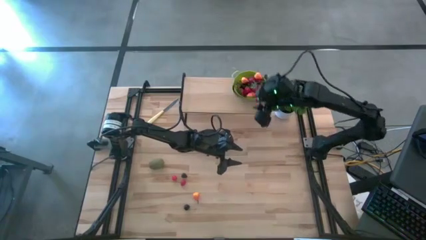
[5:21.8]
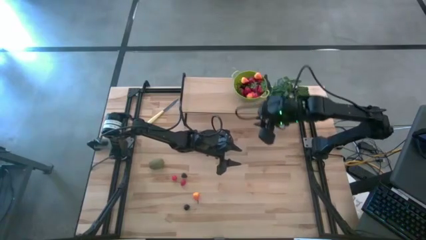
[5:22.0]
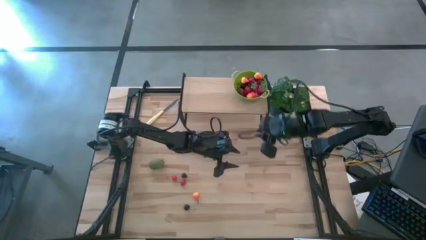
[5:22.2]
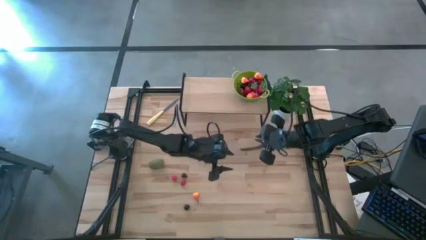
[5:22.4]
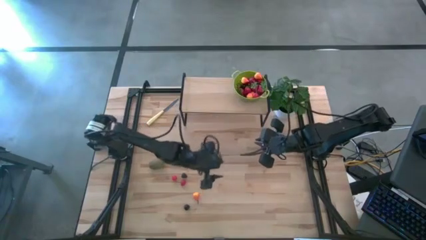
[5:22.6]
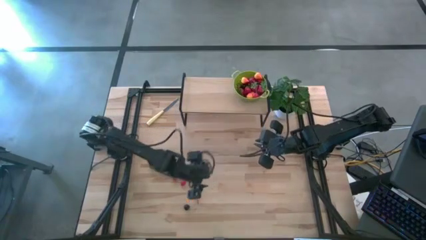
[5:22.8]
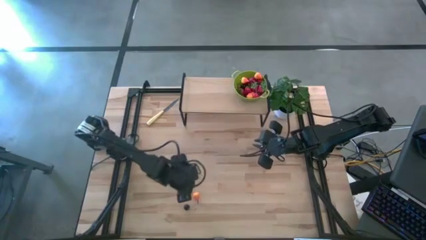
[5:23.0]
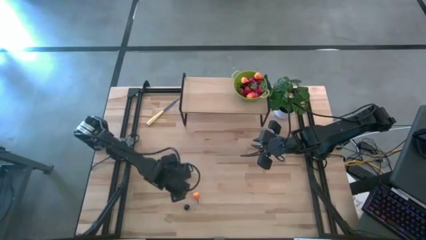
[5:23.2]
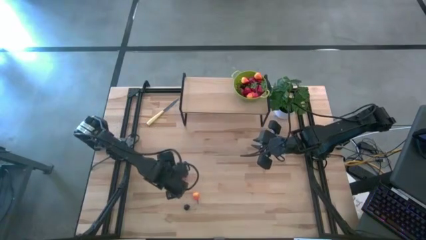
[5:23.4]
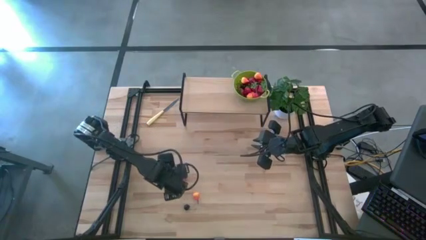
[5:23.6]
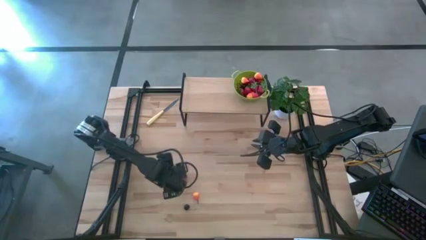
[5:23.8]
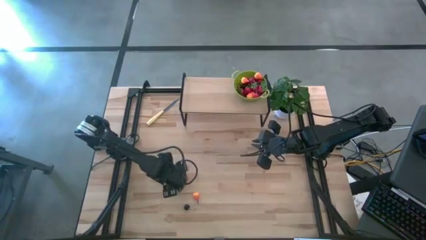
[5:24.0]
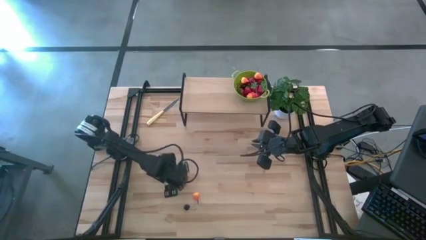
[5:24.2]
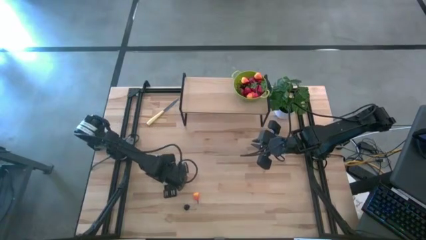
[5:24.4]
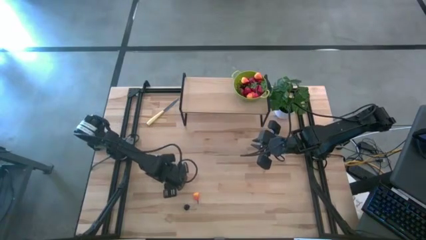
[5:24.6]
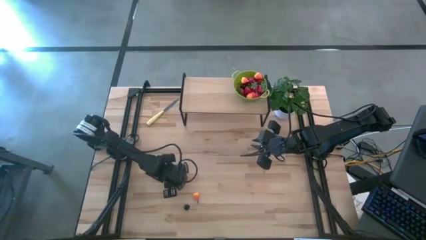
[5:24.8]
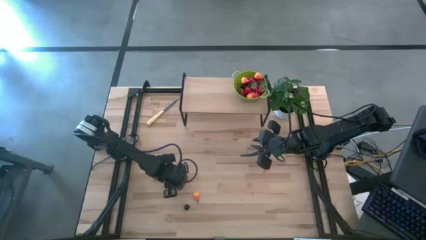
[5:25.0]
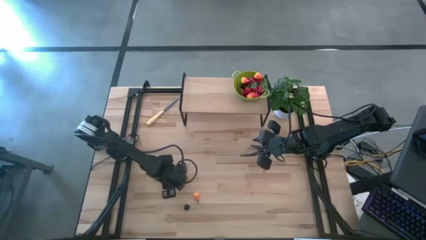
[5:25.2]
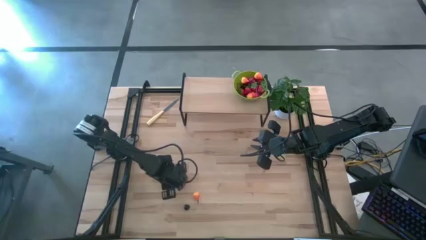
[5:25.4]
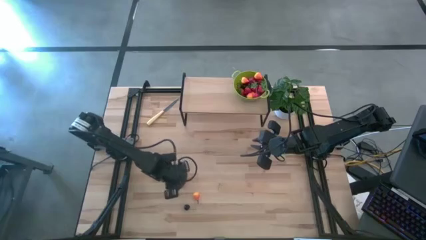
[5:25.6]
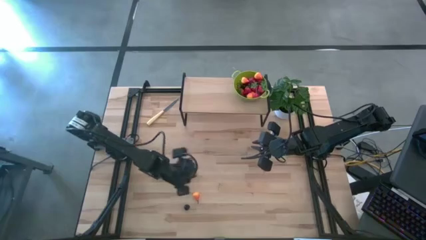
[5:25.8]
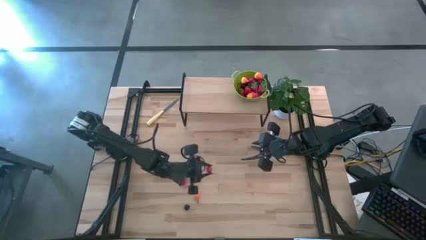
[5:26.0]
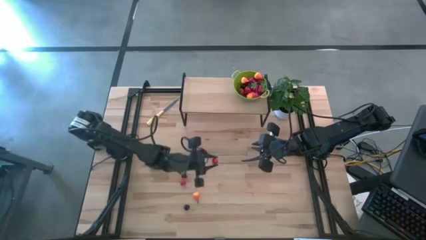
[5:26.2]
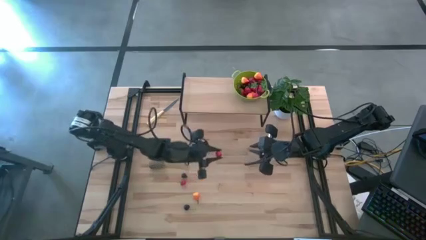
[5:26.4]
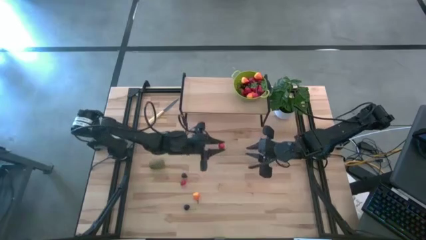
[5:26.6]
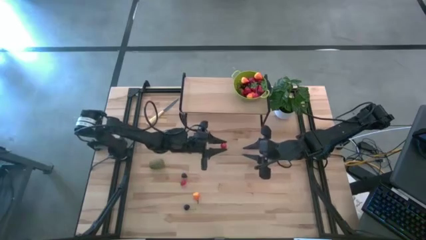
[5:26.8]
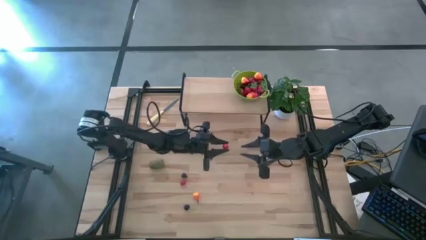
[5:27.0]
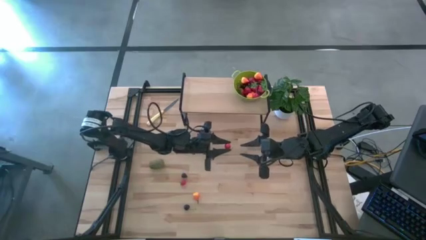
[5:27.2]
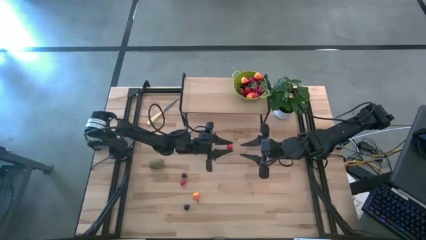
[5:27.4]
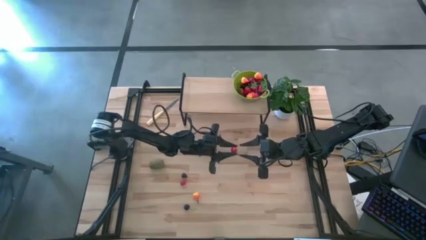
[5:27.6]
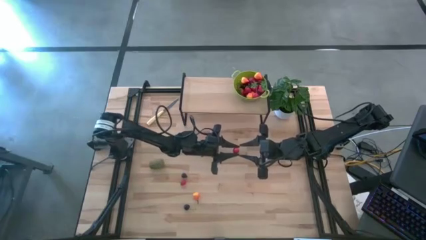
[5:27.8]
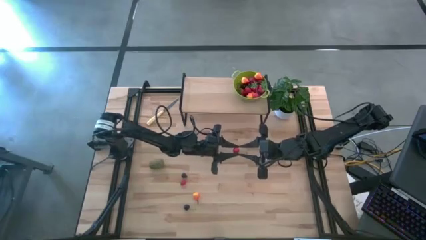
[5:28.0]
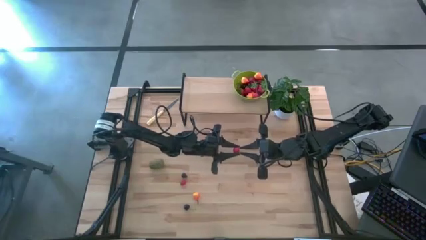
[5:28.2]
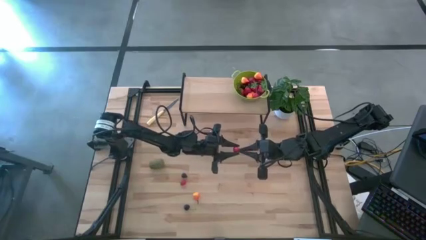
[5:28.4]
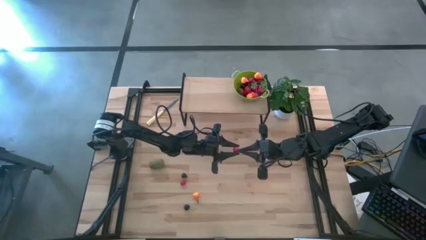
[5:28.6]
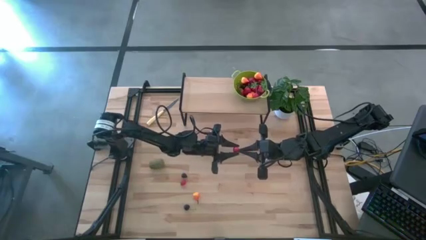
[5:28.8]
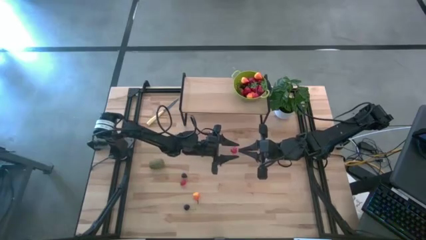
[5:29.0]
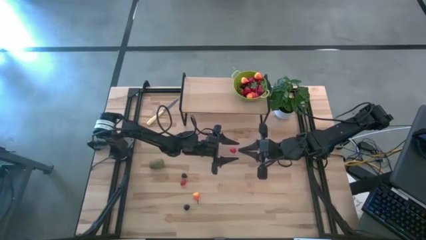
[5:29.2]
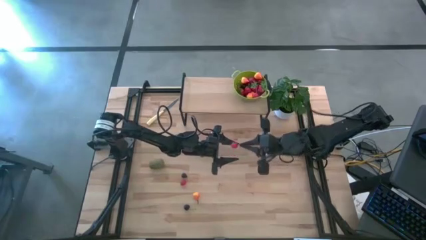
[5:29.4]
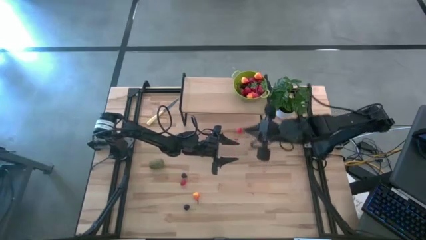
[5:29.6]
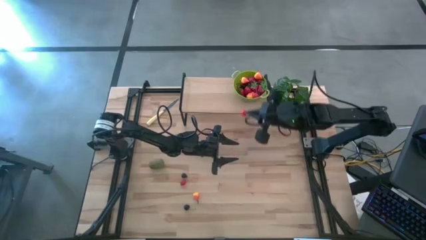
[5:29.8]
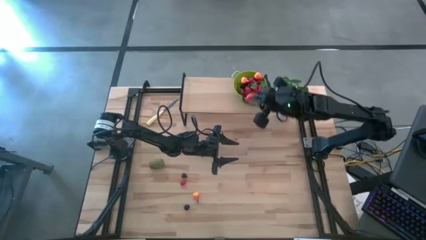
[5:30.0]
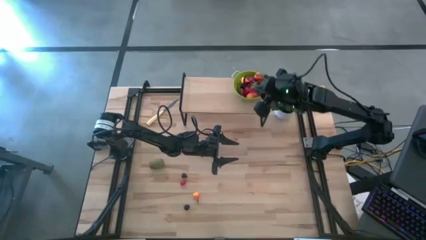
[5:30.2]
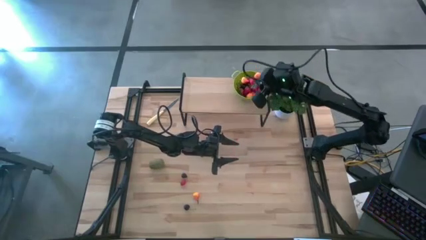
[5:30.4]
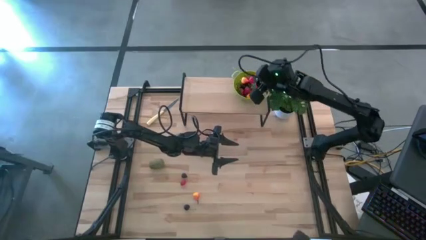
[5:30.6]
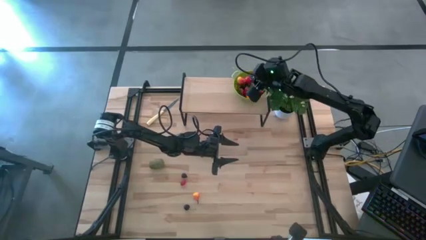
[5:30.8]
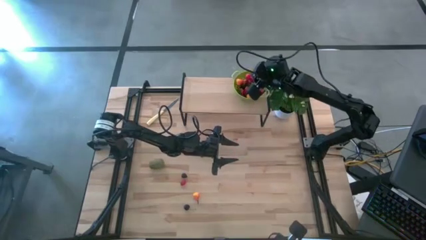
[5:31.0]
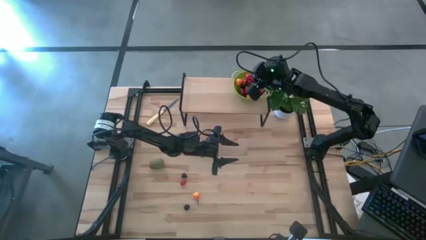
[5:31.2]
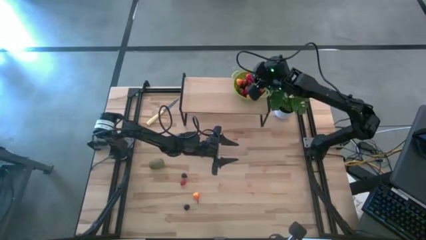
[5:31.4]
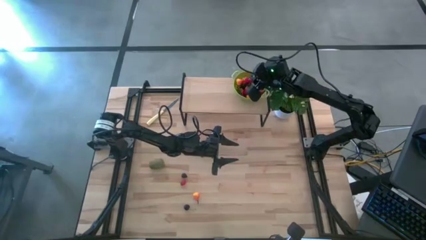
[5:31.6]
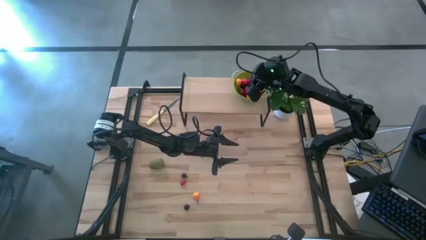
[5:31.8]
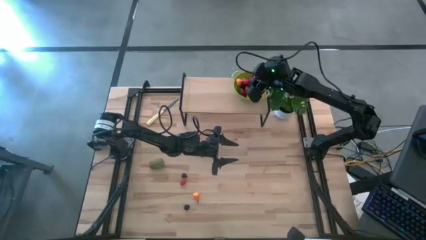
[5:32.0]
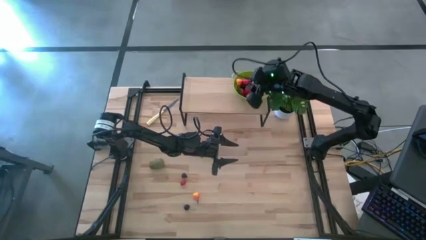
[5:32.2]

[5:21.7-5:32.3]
Task: Build produce basket
Put the red cherry into the green basket

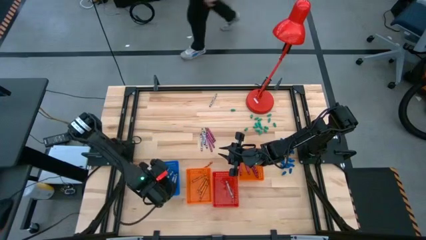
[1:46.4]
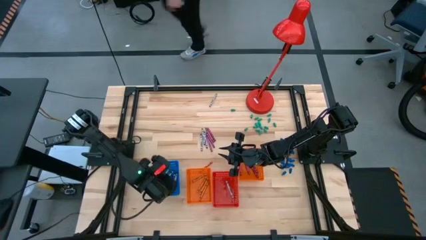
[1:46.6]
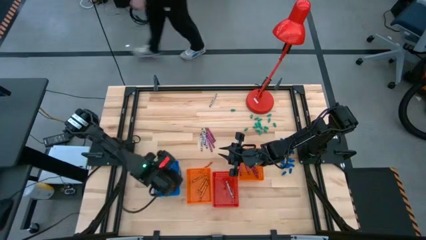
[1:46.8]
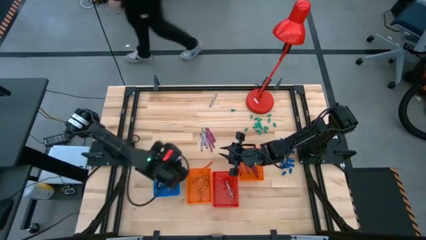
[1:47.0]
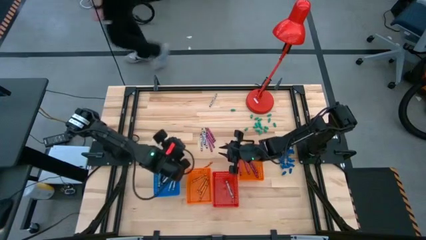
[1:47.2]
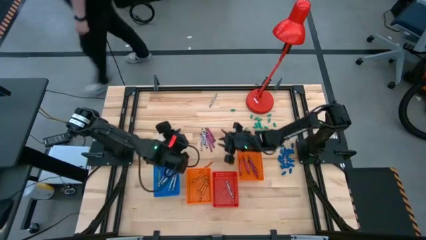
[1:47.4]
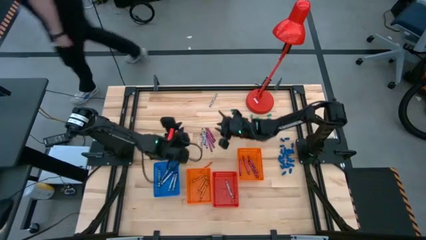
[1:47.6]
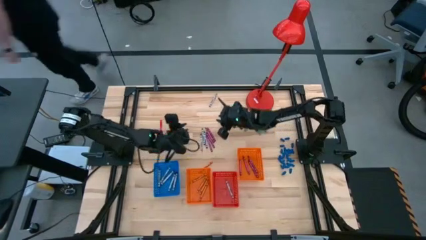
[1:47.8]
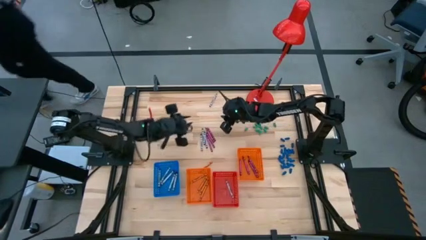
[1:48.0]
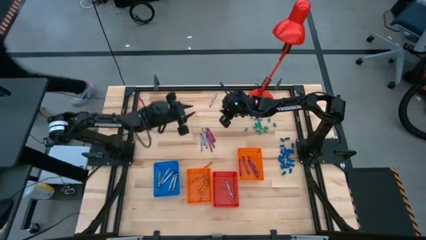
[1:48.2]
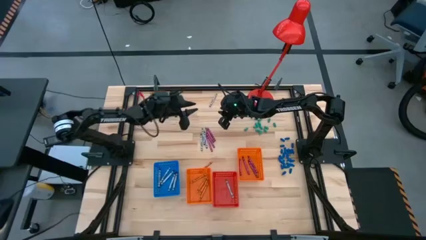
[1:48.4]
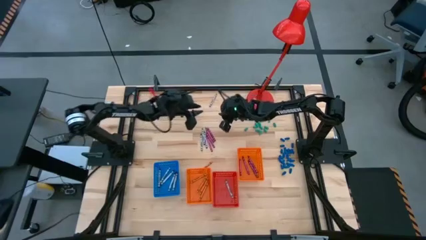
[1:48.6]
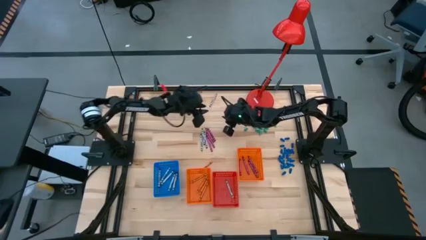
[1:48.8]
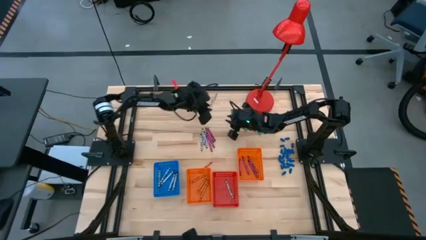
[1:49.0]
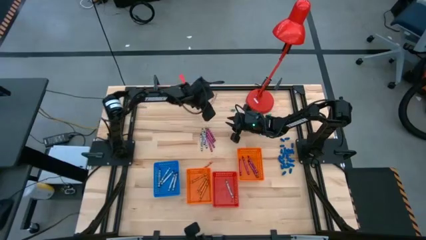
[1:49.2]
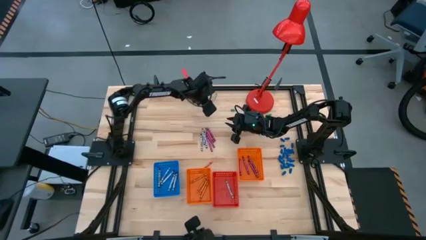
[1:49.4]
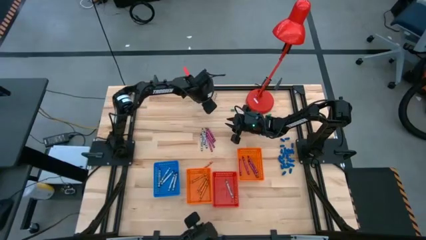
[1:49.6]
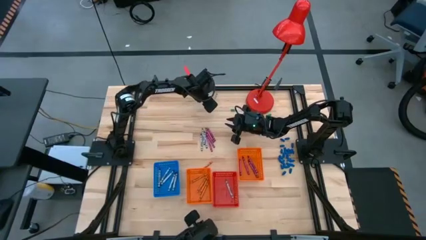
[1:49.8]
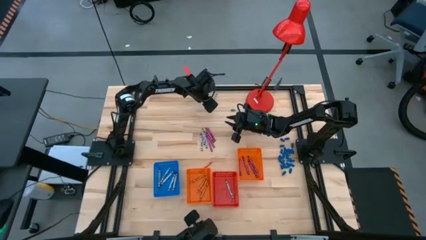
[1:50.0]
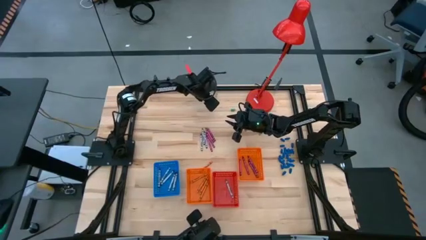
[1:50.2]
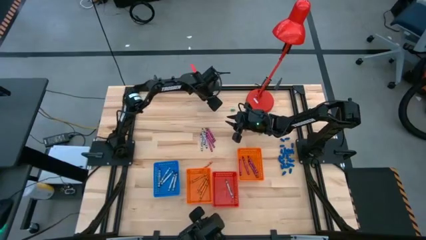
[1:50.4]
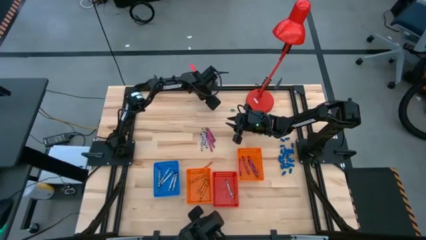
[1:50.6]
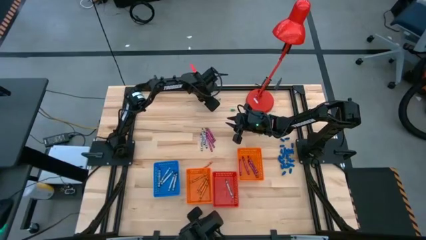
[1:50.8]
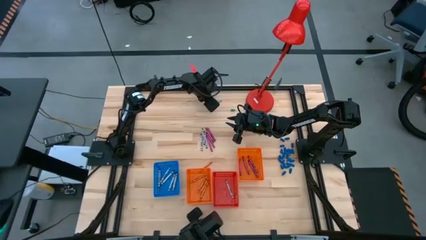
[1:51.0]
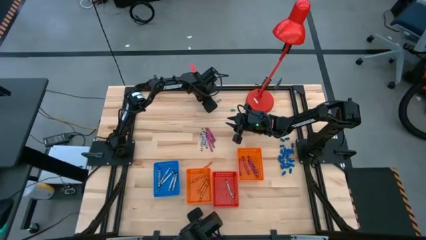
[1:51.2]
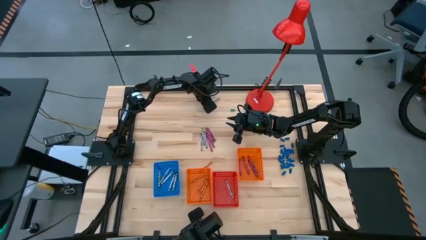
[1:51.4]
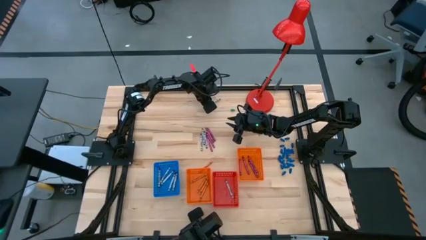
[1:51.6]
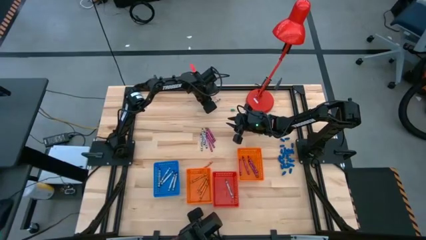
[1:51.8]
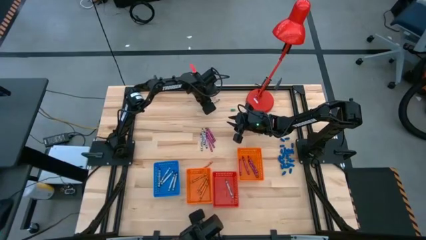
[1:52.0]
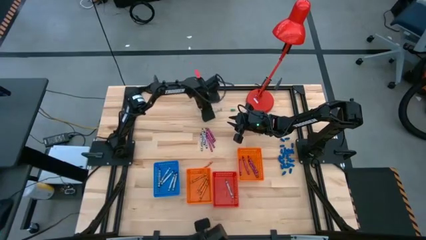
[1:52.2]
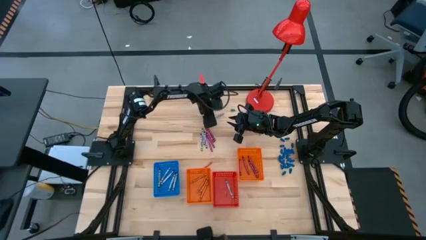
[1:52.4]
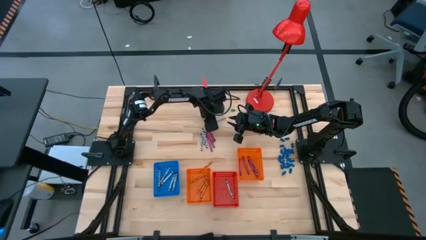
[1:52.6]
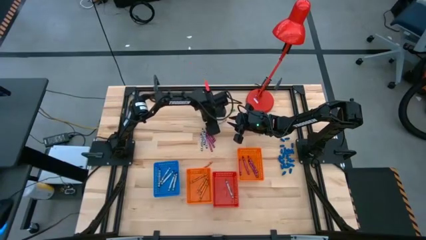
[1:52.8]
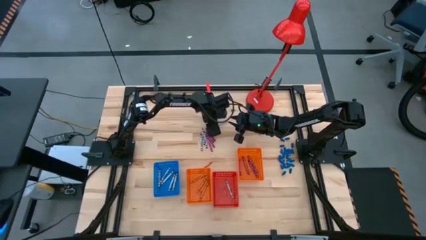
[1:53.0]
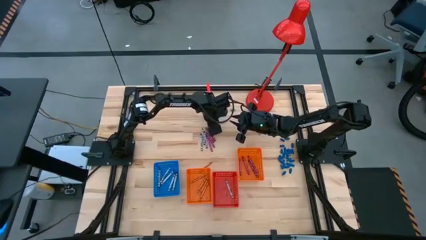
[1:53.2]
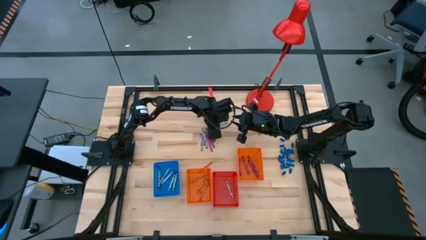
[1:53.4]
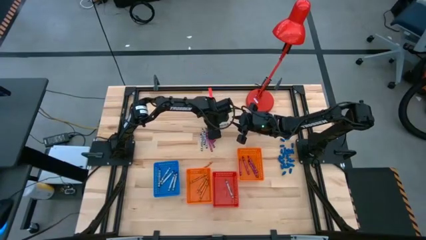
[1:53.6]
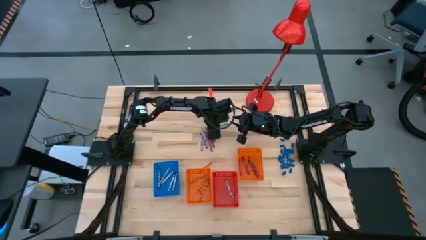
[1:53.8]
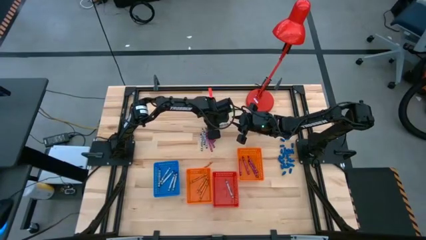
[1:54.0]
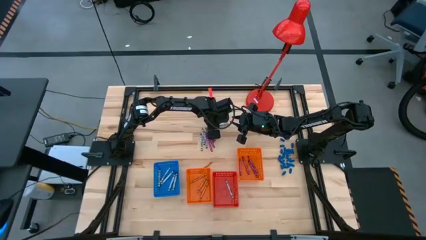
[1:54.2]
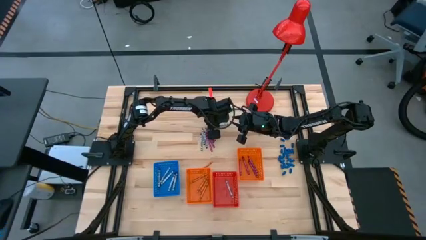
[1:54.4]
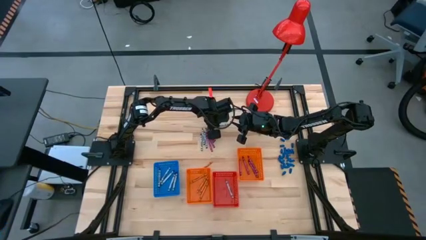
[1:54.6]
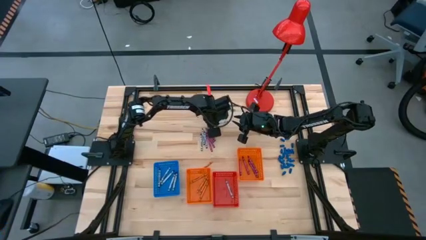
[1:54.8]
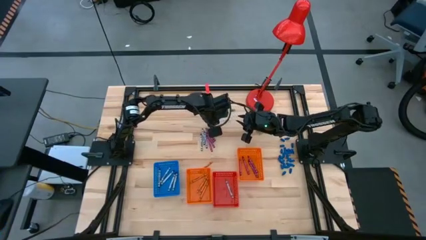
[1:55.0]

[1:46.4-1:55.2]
Task: Sort crayons
Put the gray crayon into the red bin
